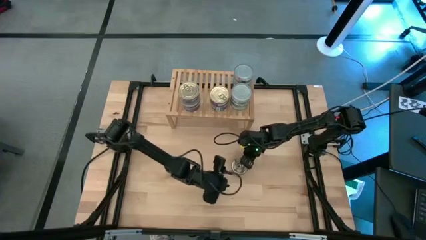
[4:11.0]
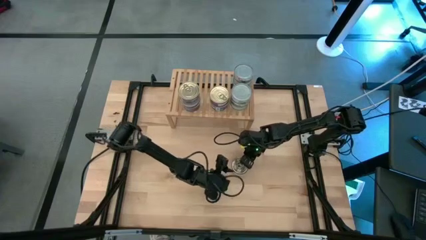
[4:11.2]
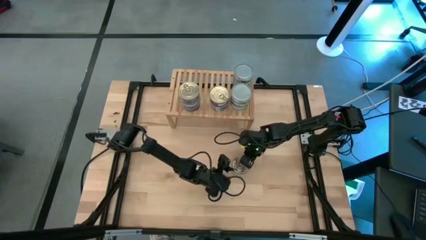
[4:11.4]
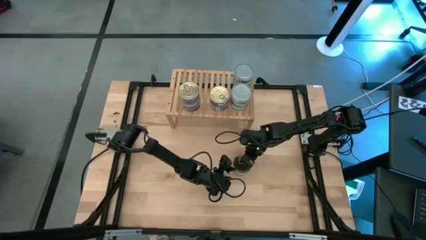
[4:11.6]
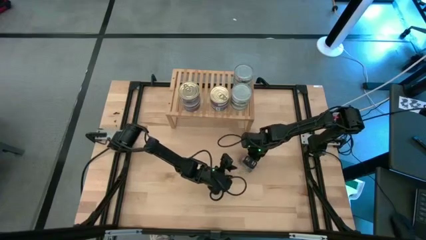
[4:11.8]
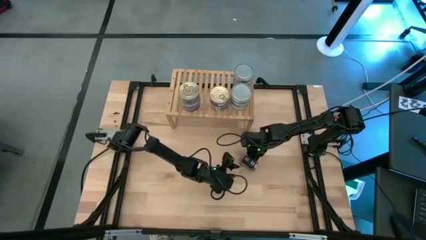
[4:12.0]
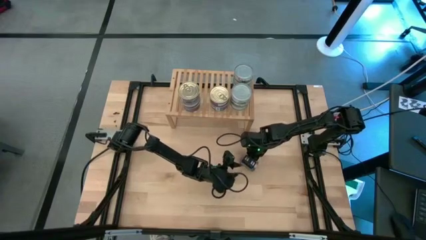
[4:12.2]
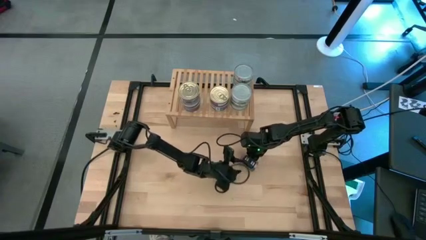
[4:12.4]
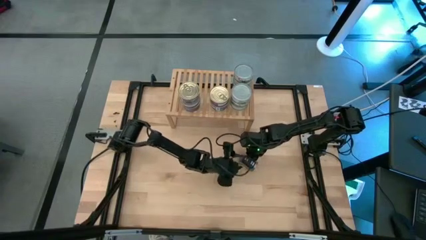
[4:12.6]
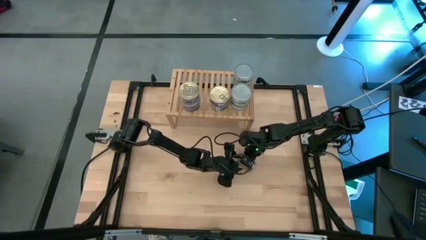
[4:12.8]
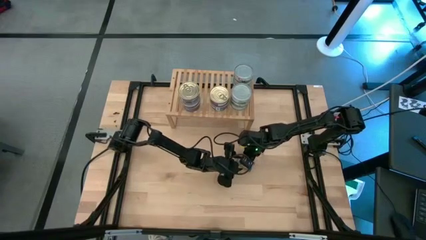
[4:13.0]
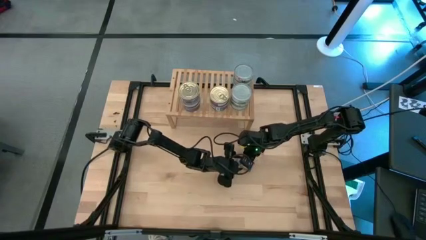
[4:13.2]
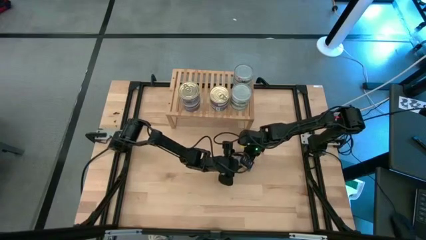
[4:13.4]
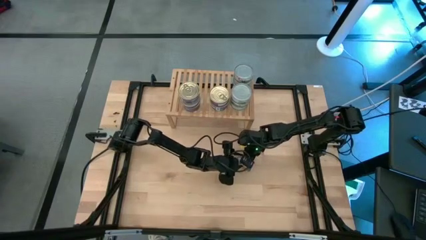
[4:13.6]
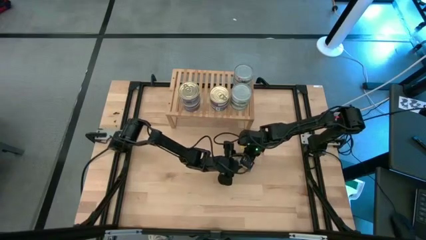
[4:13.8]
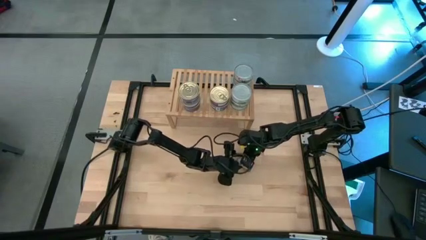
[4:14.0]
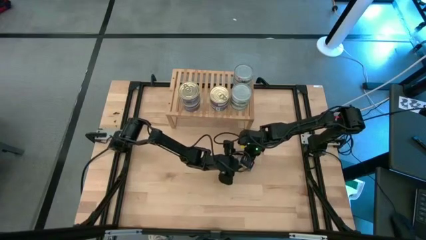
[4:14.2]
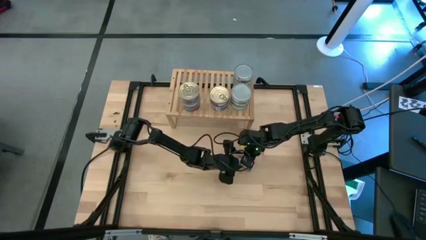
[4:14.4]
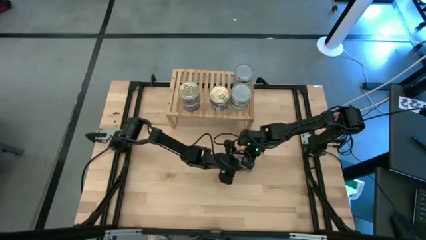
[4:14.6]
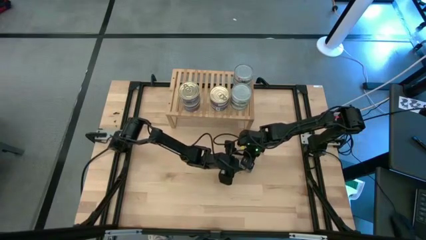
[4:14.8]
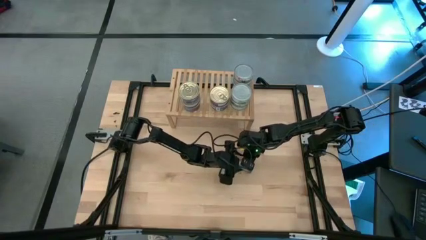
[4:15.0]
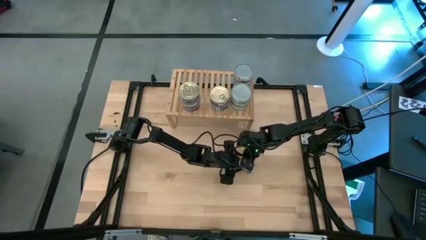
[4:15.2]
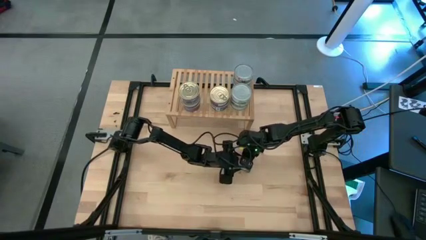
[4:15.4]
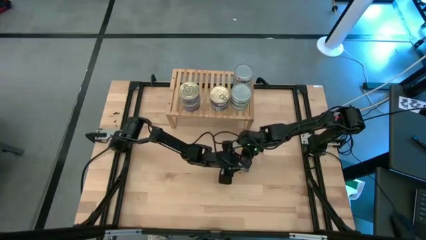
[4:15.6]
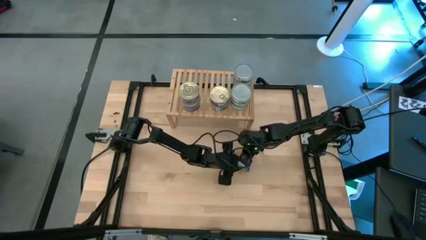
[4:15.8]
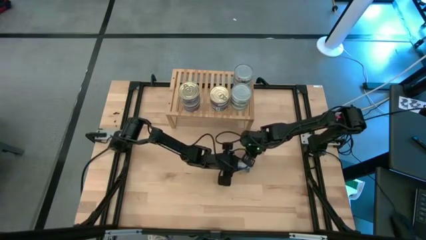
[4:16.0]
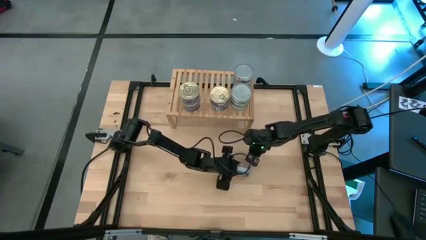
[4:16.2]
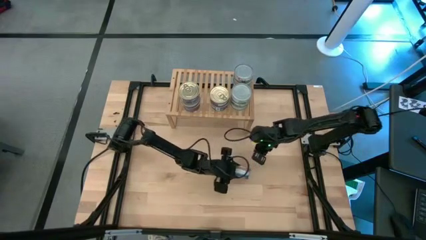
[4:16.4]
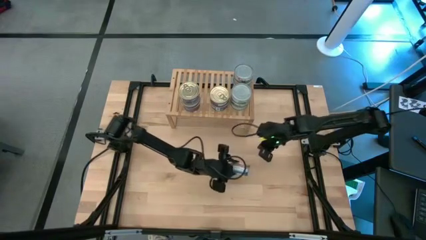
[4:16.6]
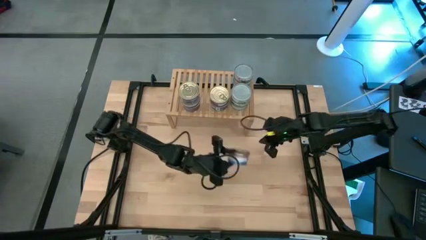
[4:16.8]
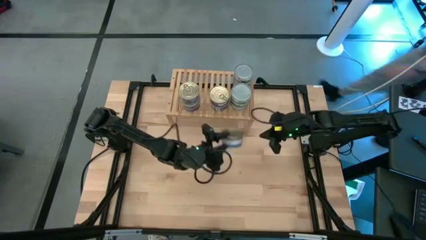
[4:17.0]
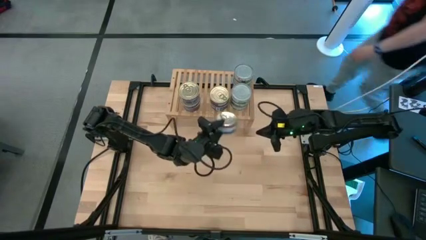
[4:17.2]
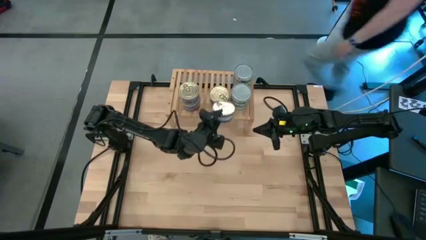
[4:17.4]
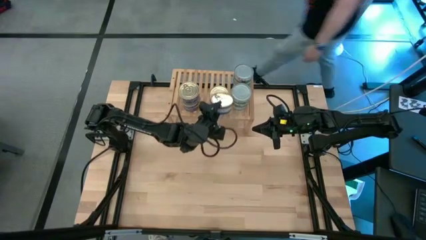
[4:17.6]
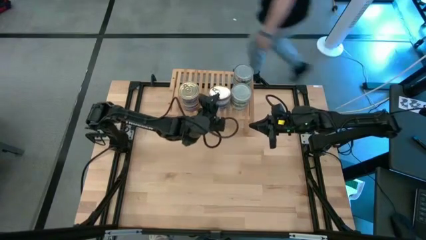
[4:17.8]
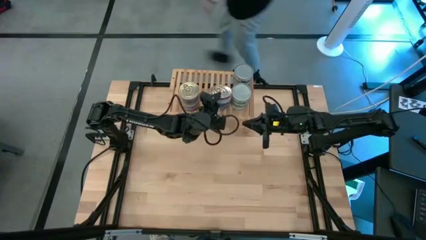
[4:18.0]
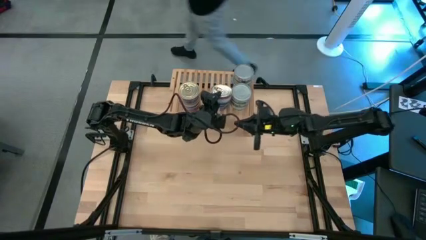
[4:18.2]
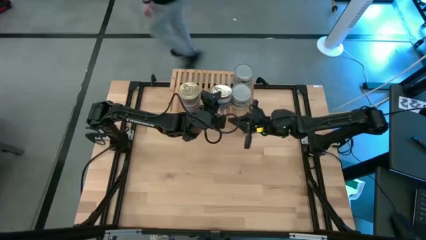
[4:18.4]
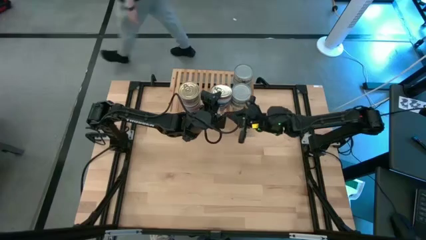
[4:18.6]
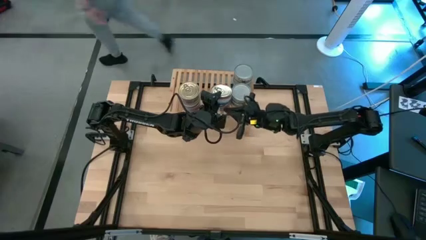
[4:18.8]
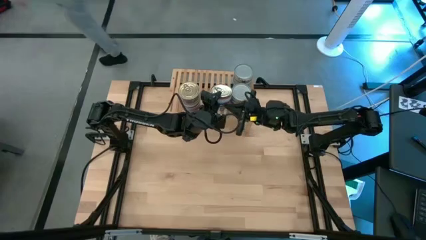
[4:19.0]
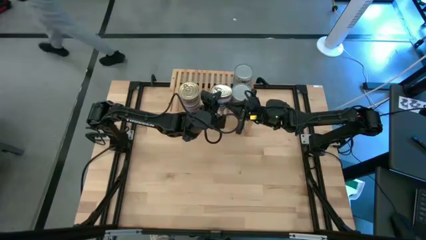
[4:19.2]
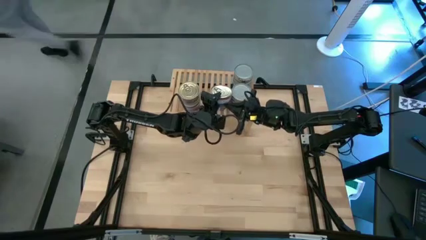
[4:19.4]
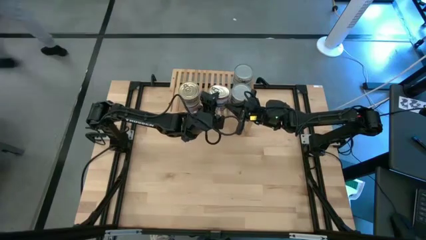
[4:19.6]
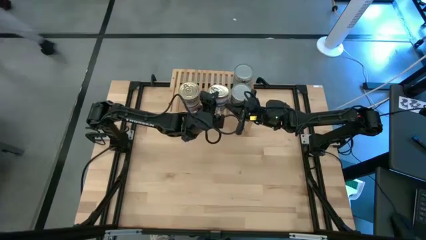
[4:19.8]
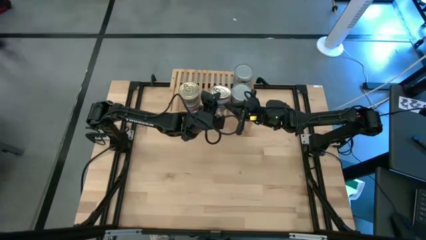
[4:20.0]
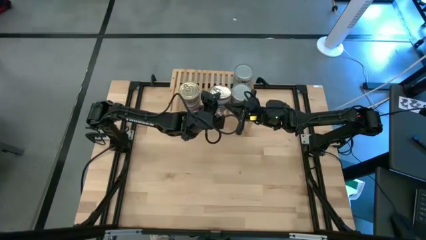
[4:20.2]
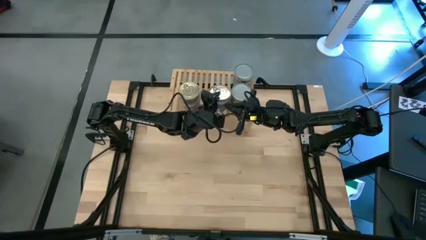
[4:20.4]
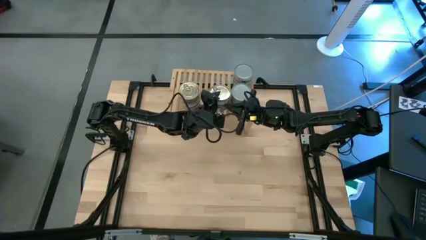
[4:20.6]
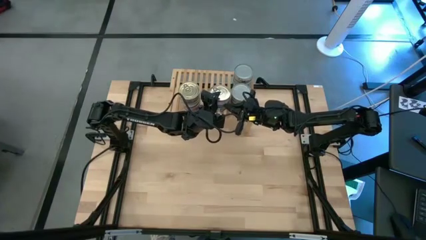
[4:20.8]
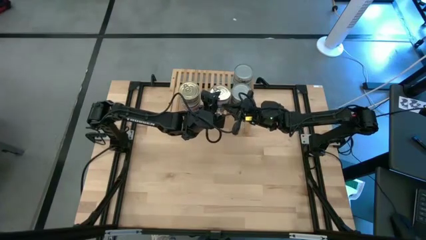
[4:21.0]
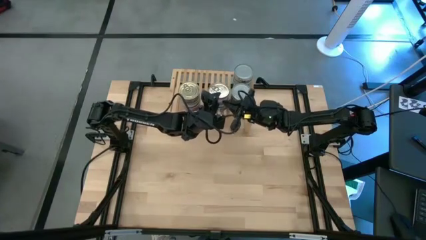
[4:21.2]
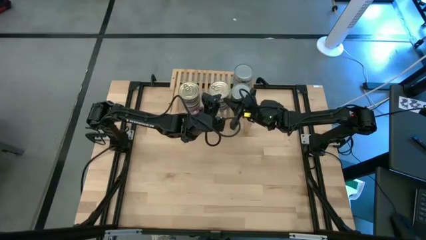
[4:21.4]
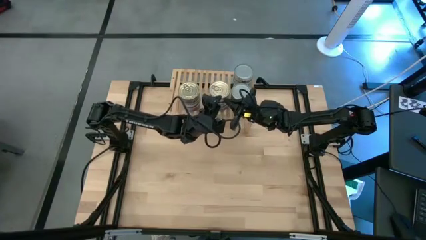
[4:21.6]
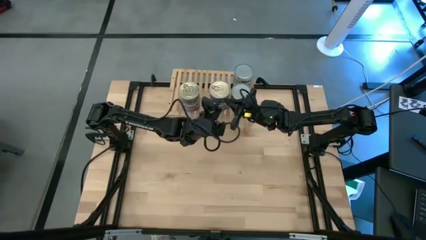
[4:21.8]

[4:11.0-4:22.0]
Task: Stack canned seafood by type on shelf
Stack the blue tuna can on top of the blue tuna cans on the shelf

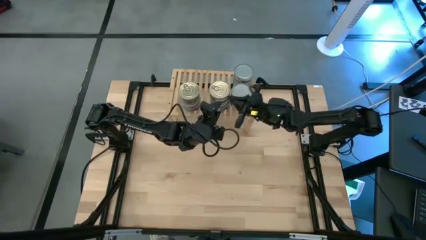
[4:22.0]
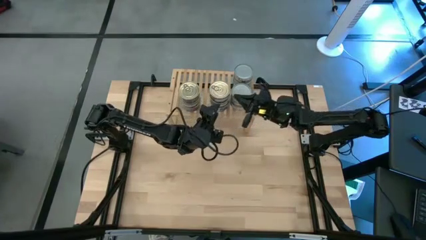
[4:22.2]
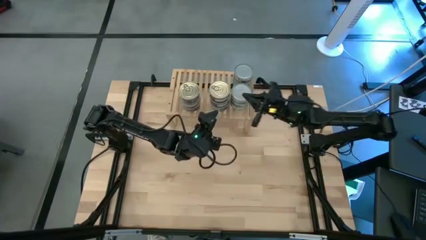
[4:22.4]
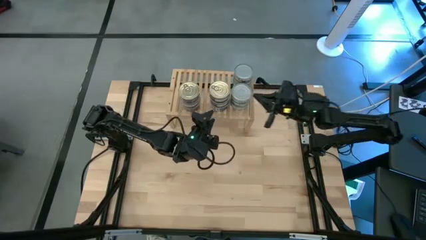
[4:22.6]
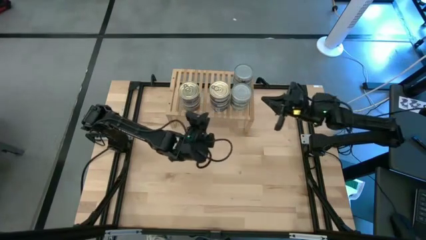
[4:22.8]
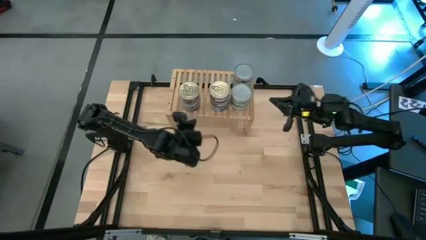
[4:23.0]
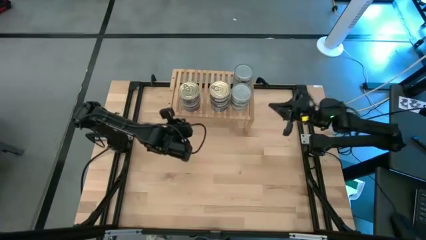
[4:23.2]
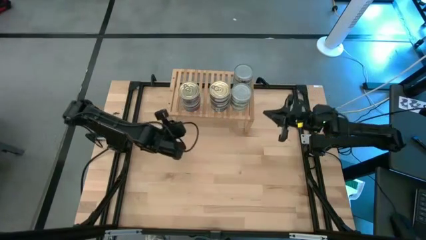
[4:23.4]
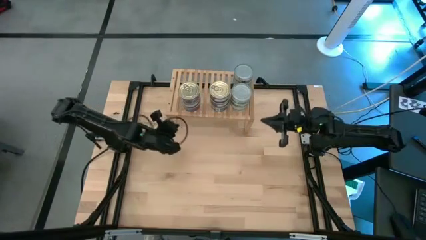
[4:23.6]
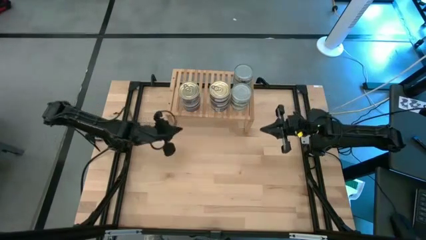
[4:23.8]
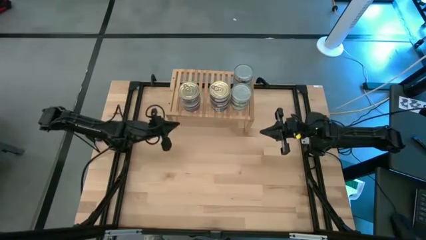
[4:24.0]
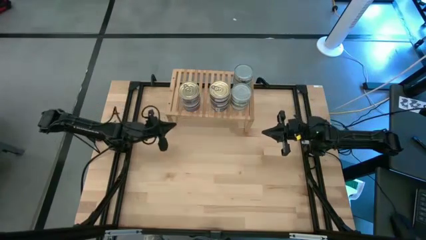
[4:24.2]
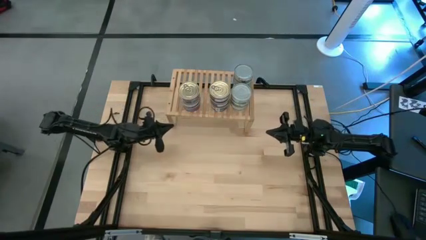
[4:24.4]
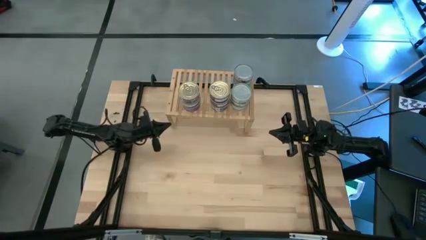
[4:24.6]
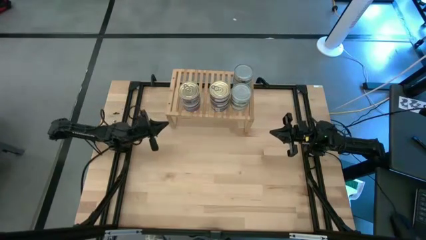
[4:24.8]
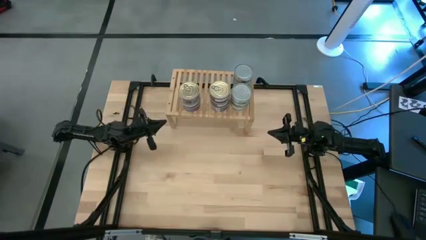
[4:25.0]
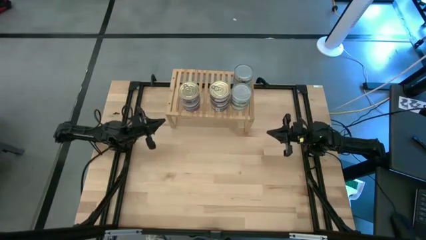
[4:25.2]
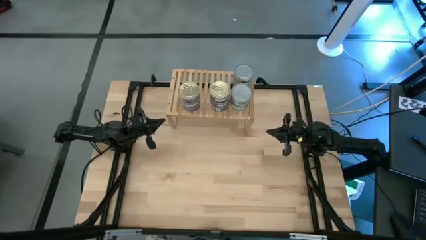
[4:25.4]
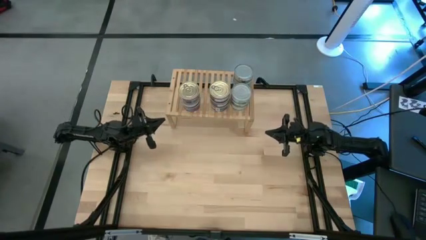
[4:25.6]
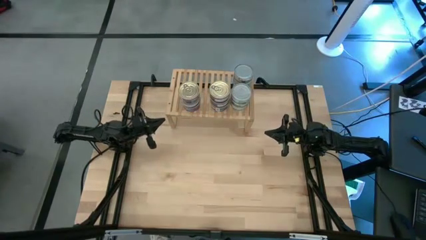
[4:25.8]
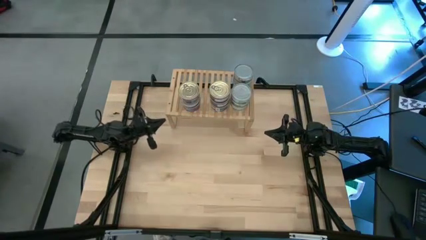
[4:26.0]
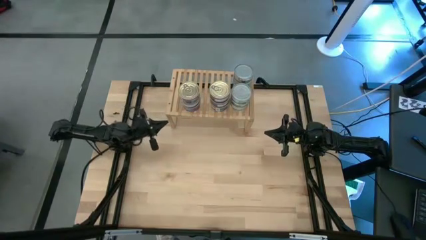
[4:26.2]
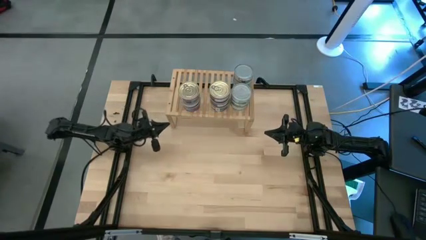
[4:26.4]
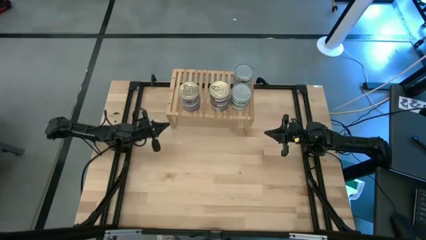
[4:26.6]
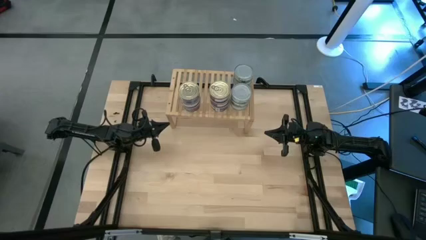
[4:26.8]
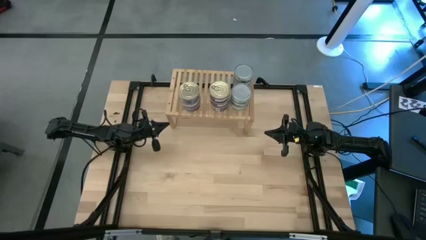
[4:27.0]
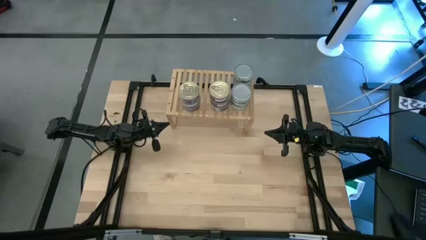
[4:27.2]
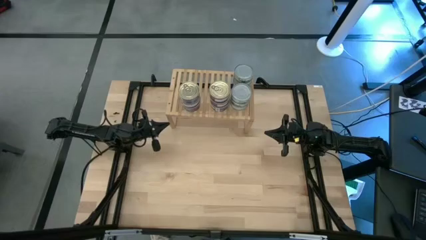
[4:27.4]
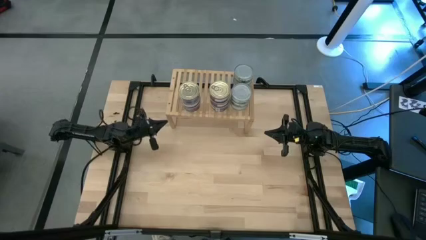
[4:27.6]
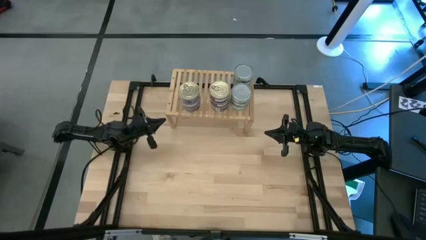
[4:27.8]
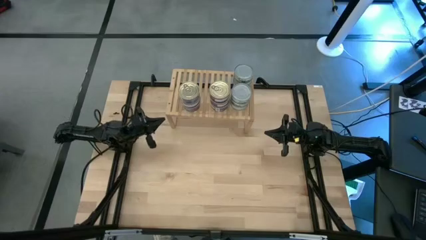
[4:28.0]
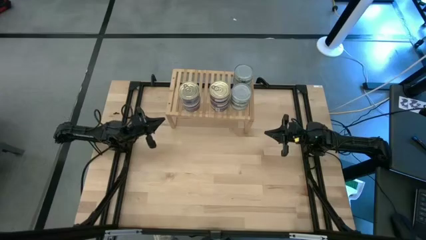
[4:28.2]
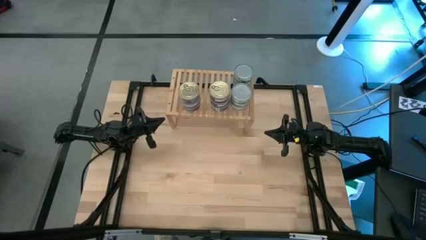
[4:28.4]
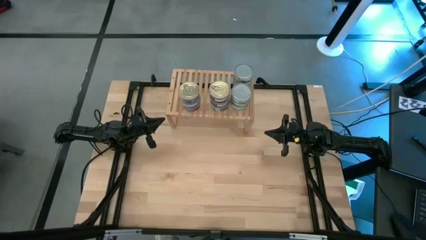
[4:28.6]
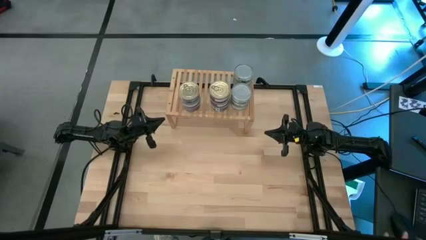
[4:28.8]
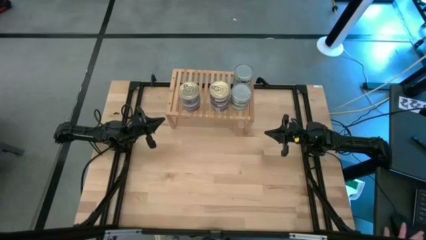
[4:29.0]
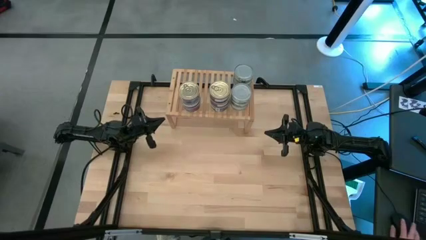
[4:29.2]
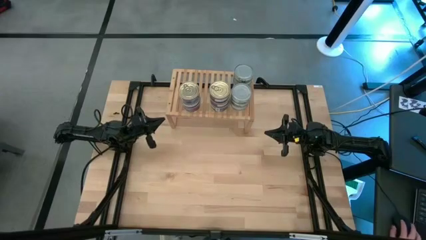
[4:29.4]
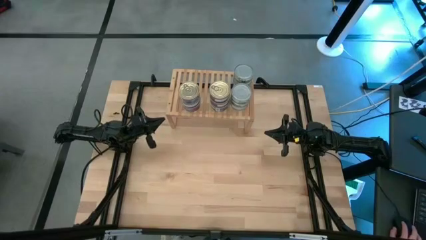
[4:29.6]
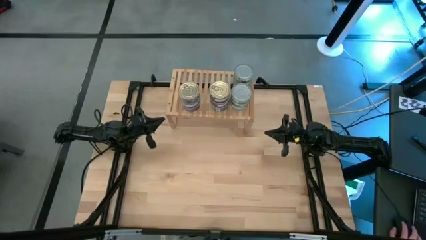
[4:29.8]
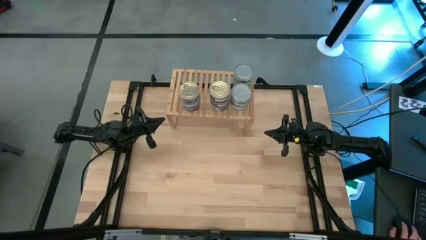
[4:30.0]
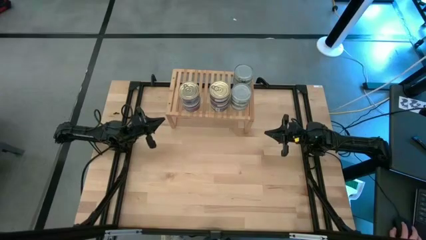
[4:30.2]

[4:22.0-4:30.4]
Return to Home Position
